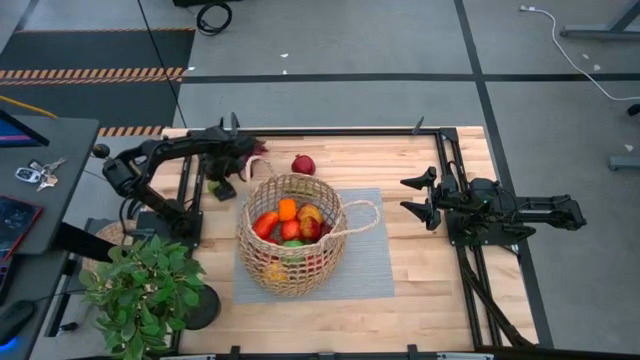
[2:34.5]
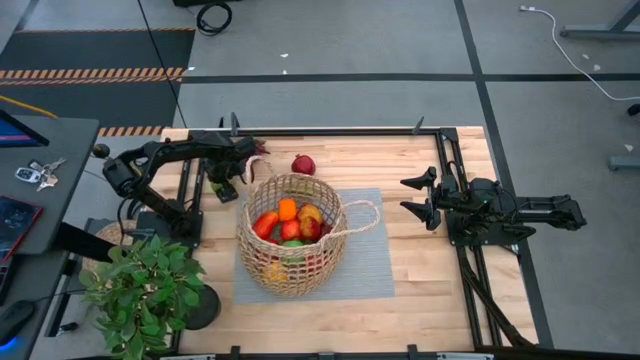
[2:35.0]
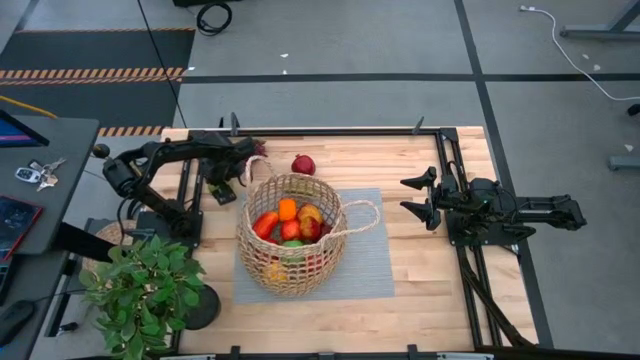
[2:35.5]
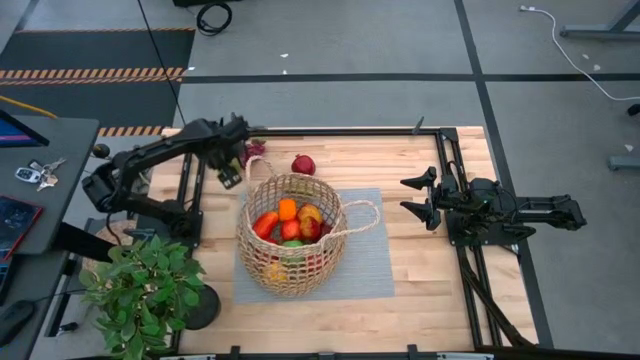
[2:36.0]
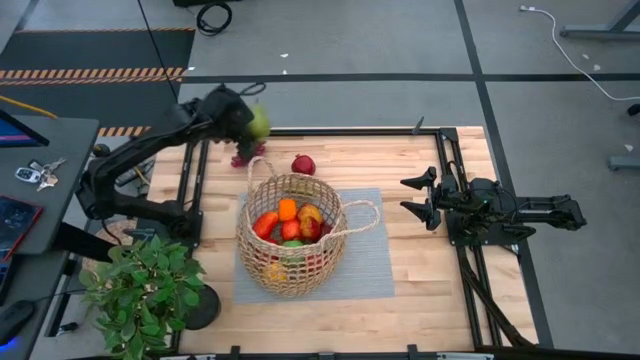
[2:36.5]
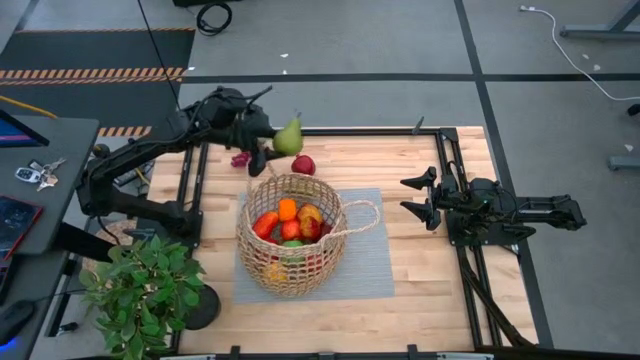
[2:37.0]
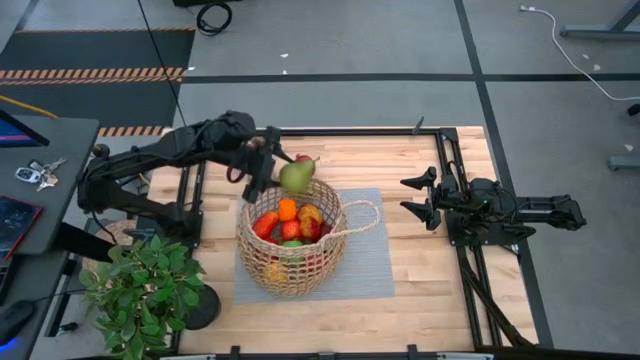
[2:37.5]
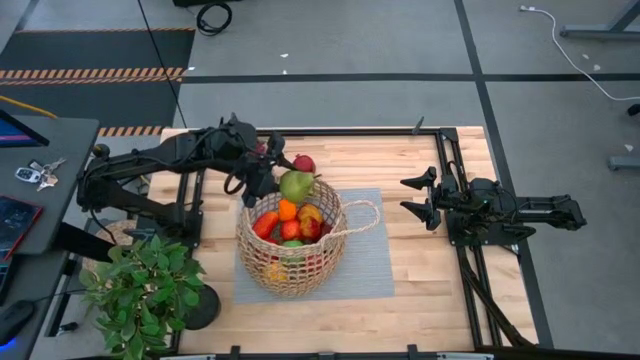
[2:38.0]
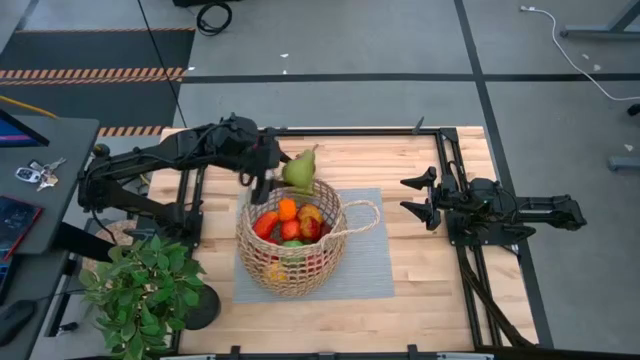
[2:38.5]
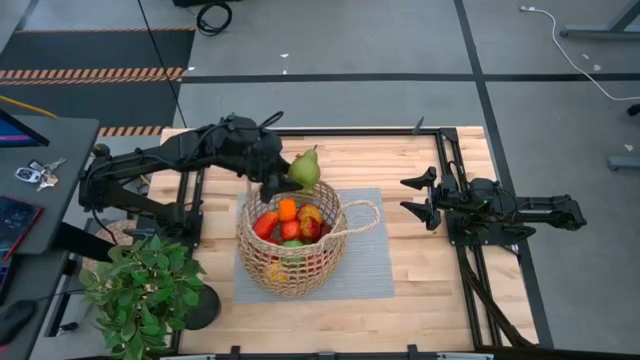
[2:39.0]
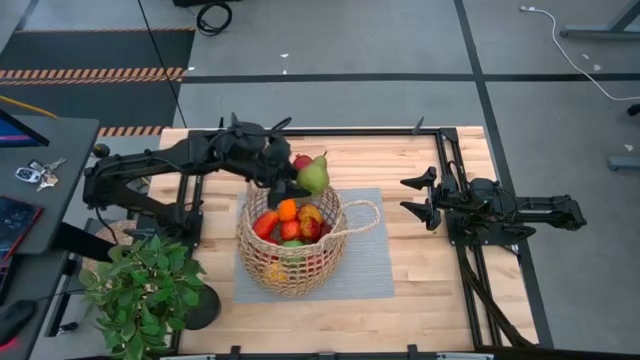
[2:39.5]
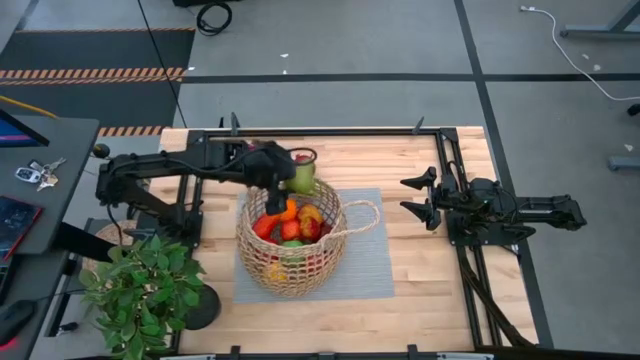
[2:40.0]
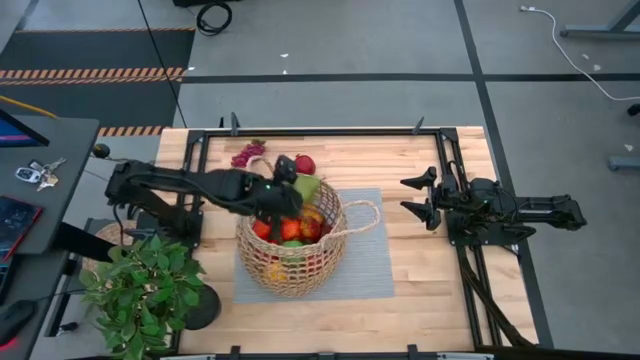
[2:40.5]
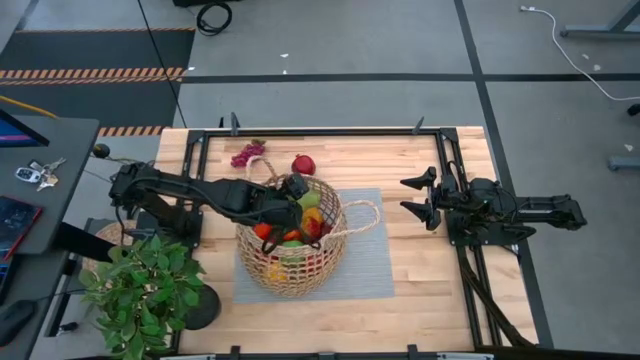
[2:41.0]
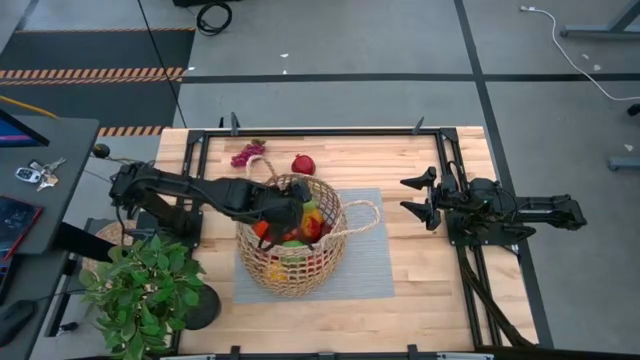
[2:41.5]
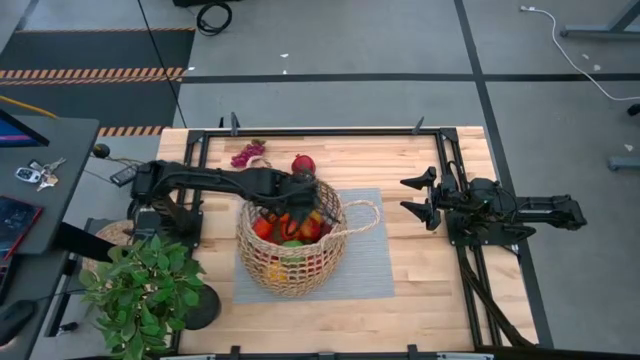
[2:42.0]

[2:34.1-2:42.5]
Task: Build produce basket
Put the green pear into the brown woven basket

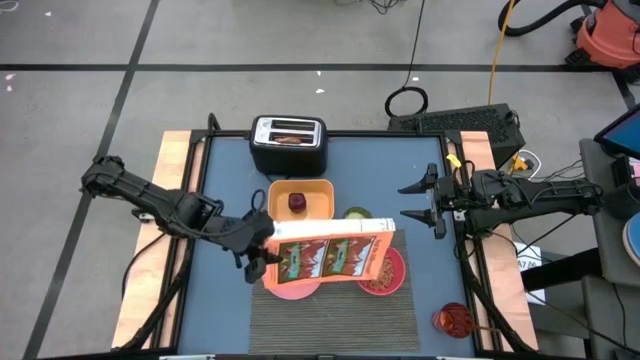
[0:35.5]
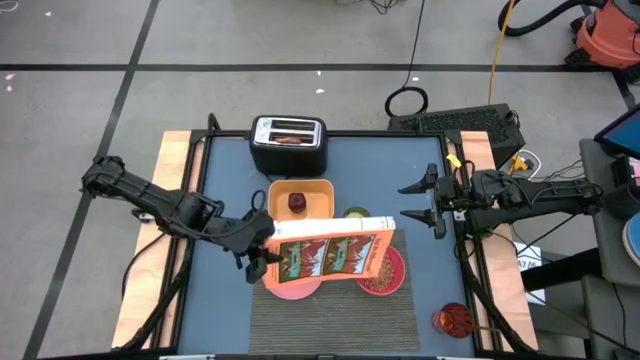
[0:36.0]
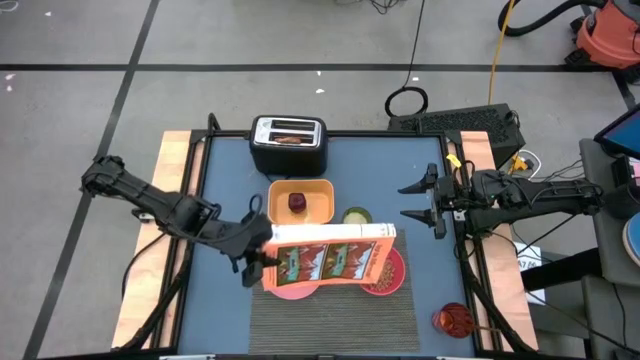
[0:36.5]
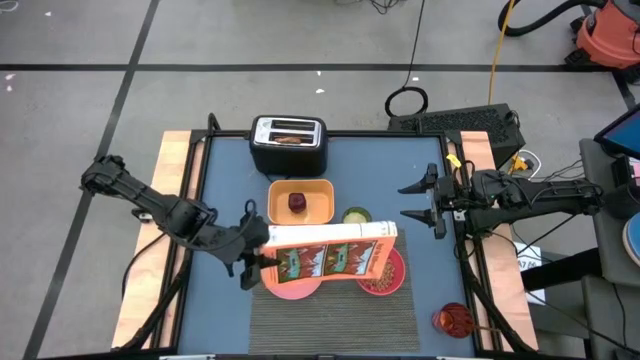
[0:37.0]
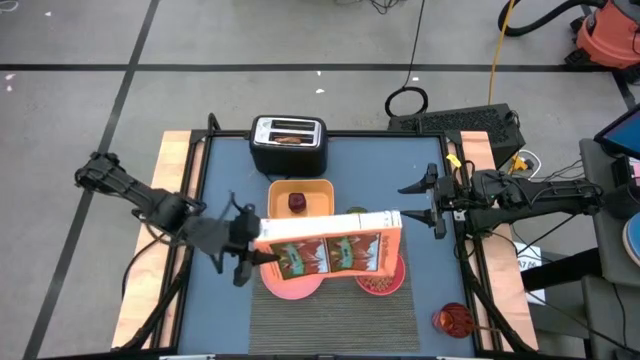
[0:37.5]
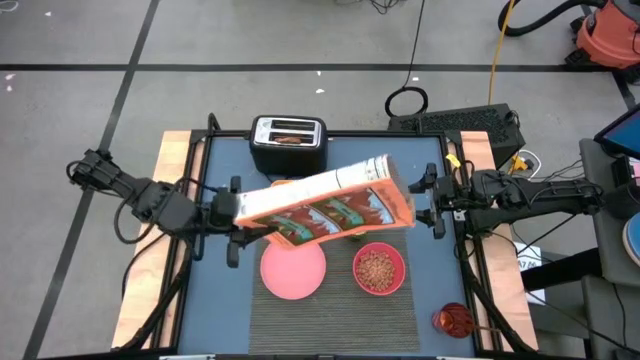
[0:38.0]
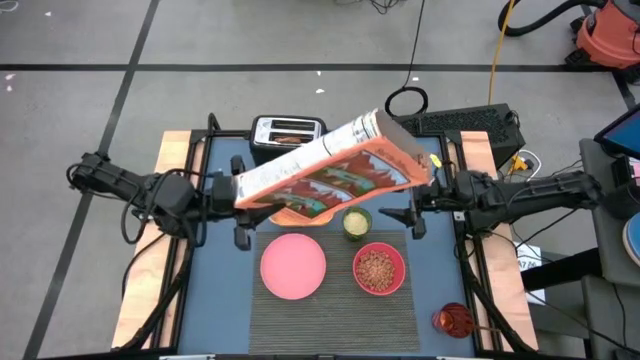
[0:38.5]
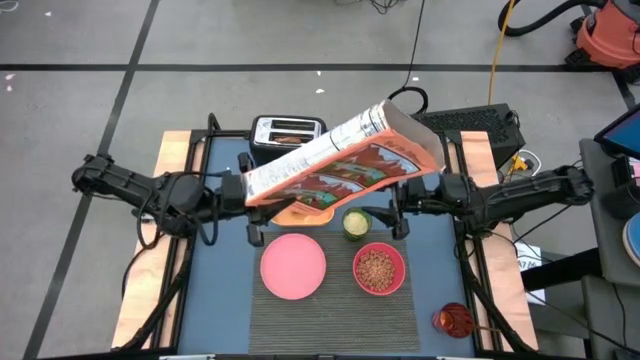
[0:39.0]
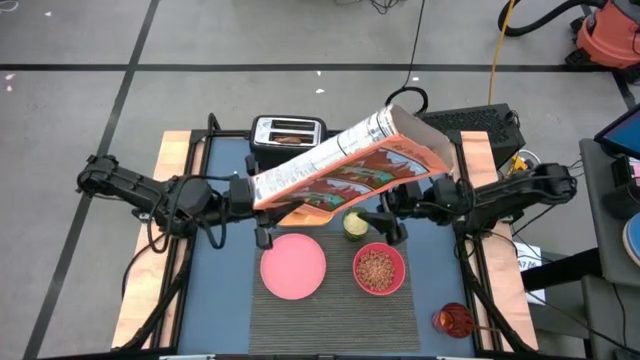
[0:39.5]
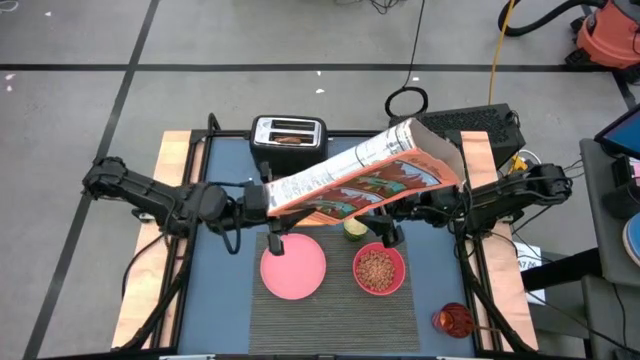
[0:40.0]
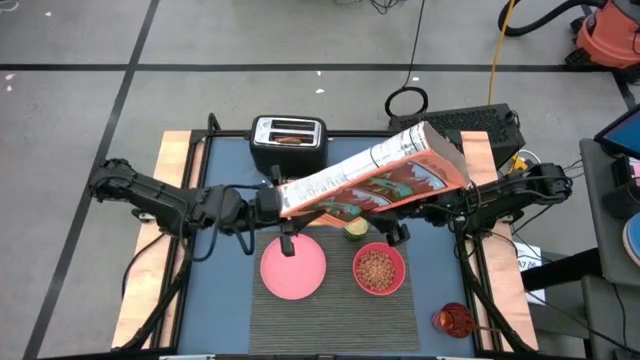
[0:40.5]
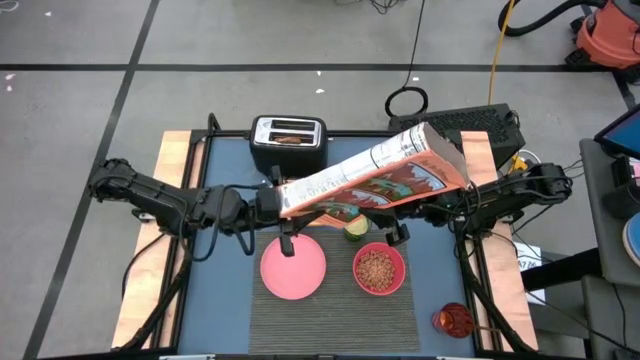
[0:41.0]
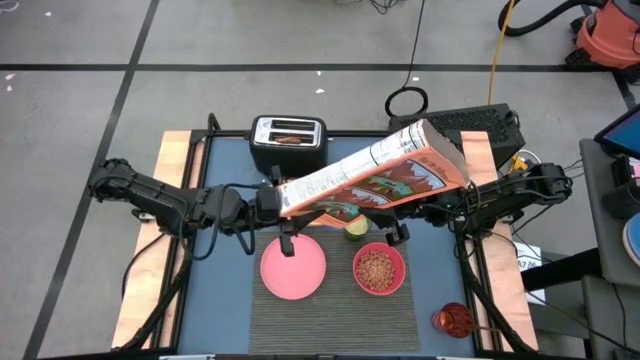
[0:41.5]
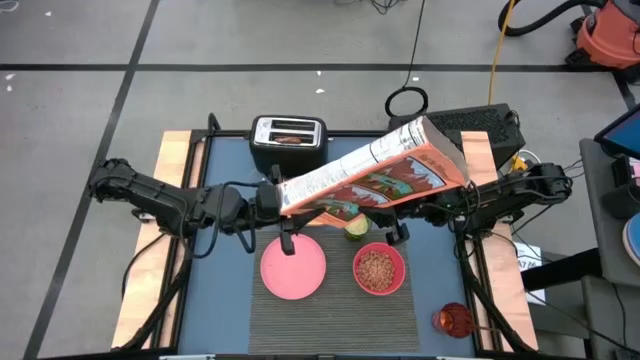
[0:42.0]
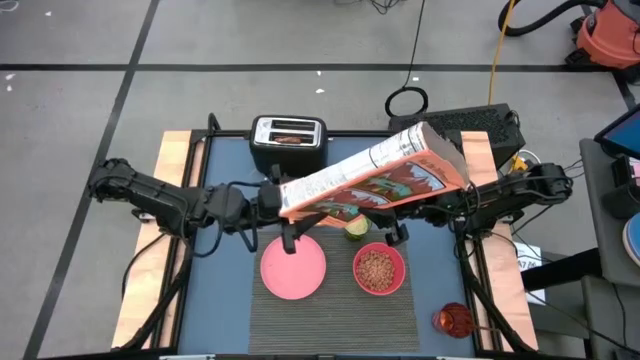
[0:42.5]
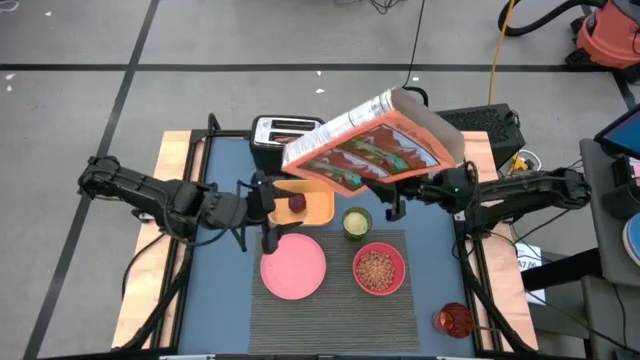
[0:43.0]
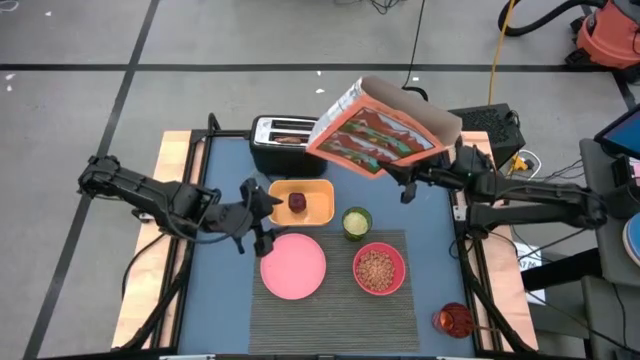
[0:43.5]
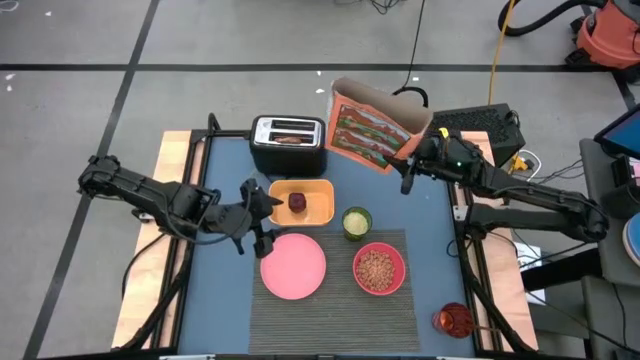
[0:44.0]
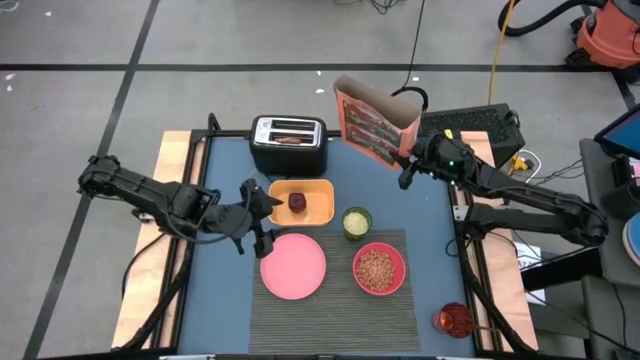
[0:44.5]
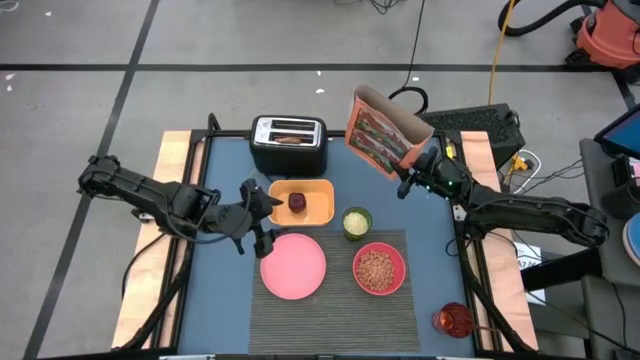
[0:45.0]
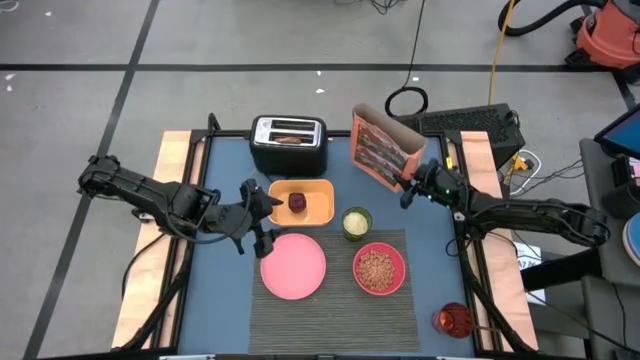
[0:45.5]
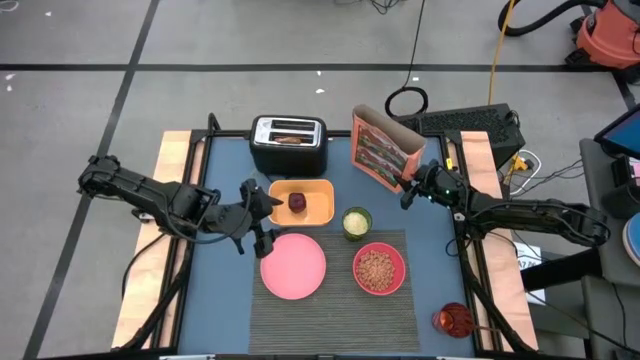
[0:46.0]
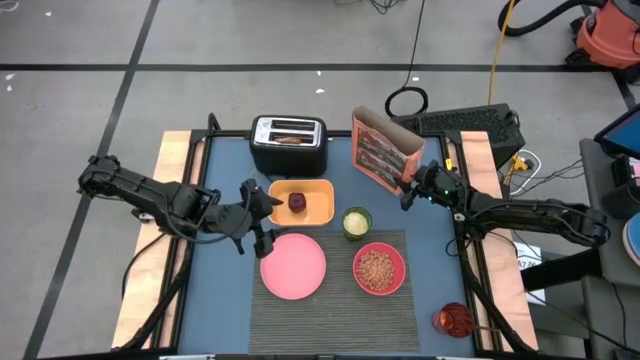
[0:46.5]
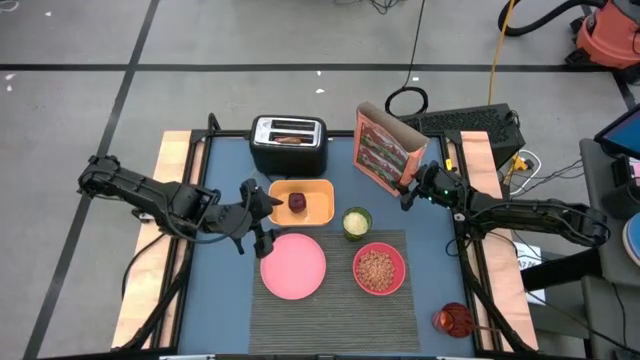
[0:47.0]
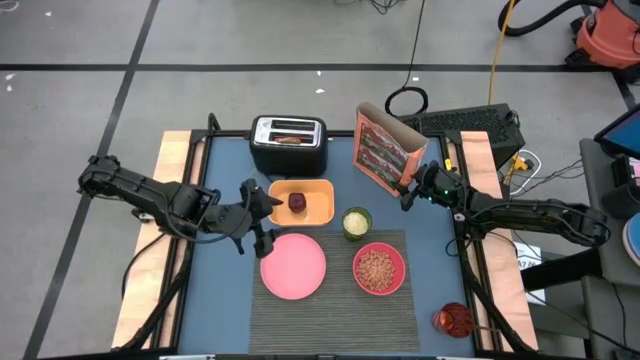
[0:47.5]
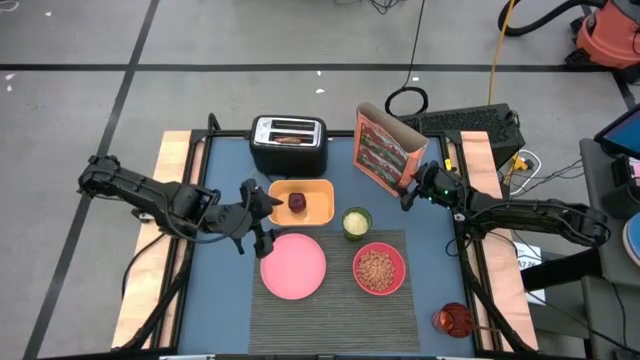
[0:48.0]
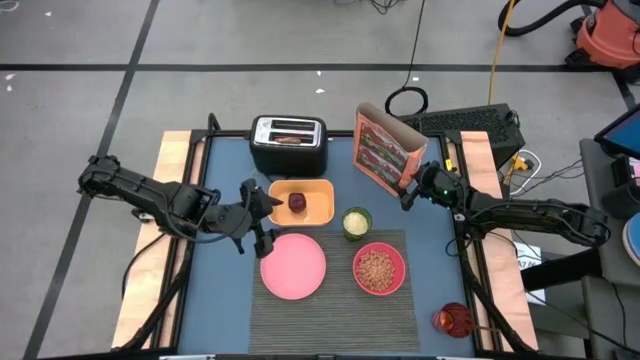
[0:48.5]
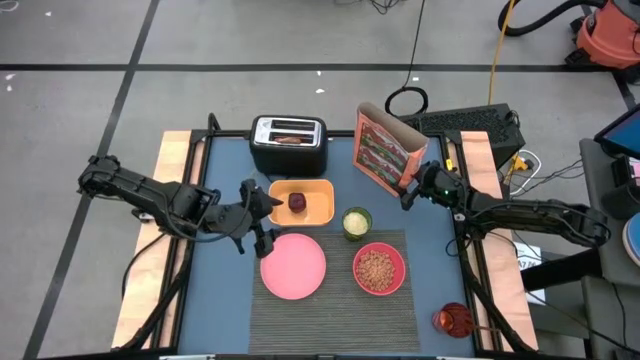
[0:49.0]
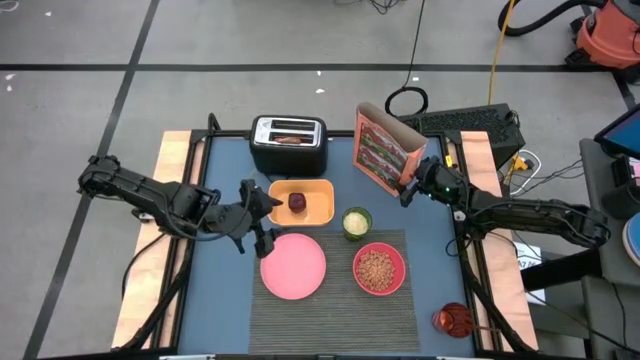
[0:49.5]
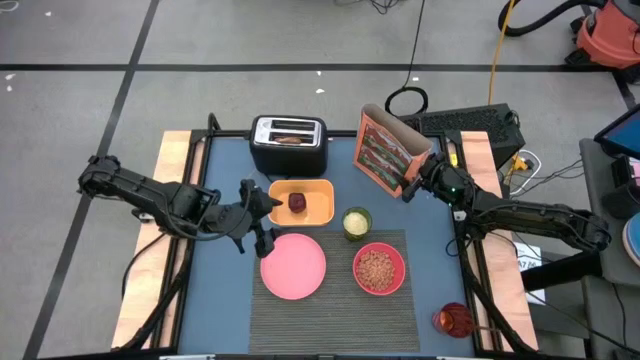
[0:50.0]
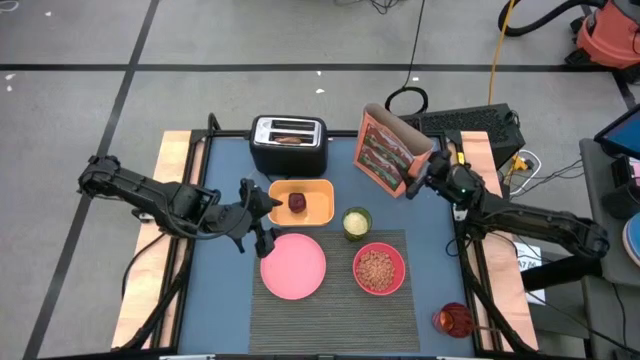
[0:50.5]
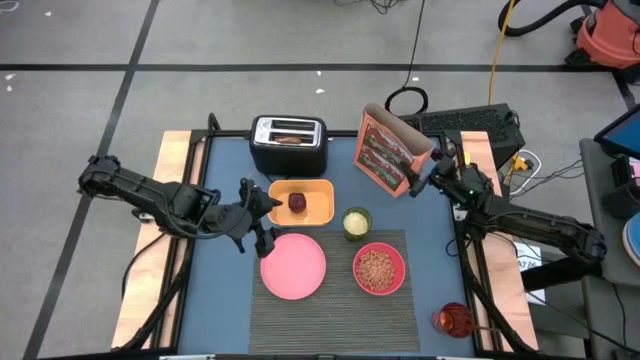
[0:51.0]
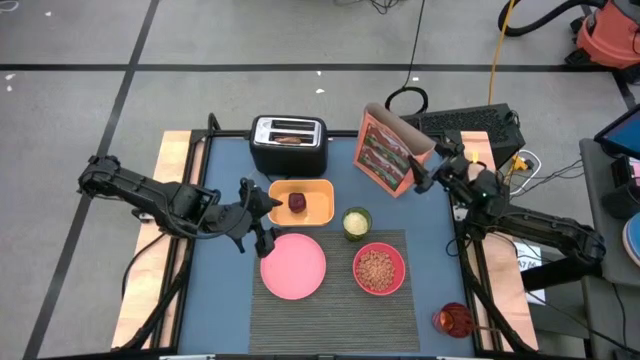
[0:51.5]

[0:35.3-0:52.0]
Task: Arrange a breakfast setting
Pour the cereal from the orange cereal box into the pink bowl
